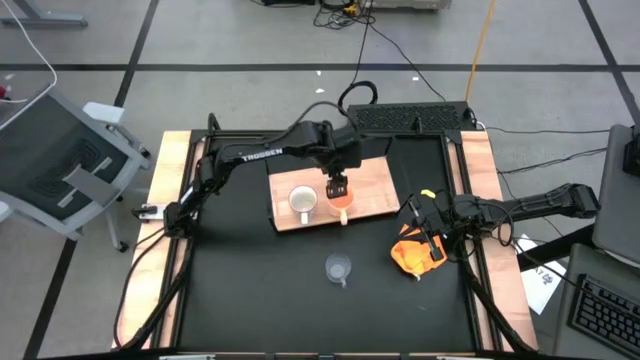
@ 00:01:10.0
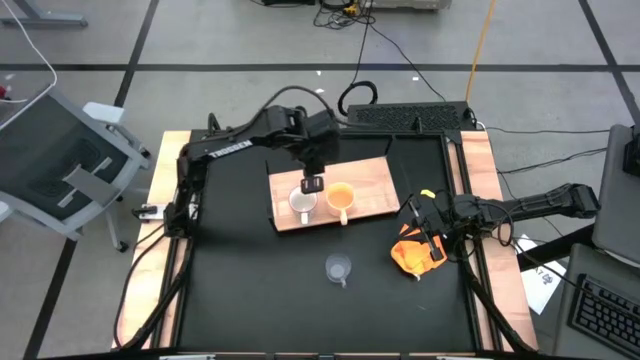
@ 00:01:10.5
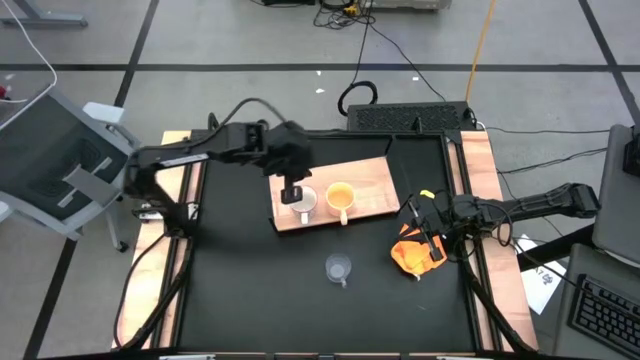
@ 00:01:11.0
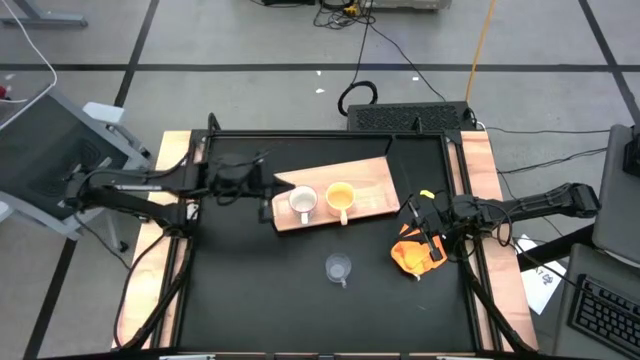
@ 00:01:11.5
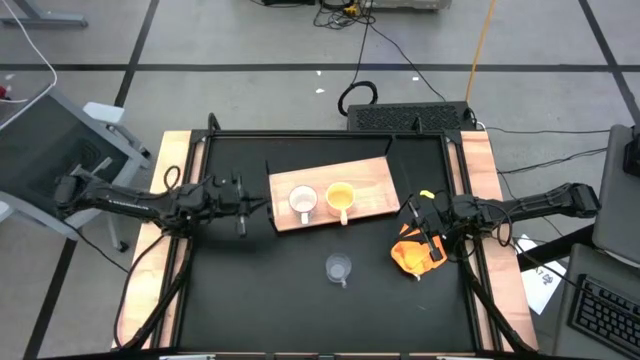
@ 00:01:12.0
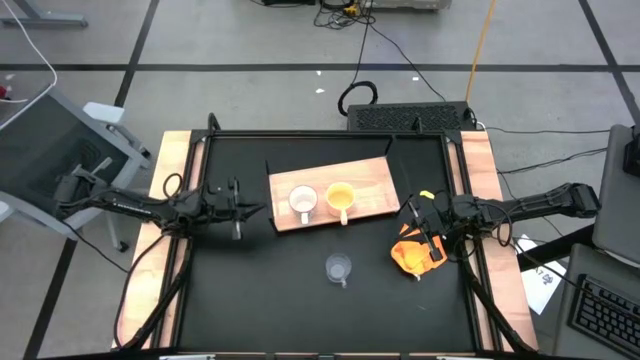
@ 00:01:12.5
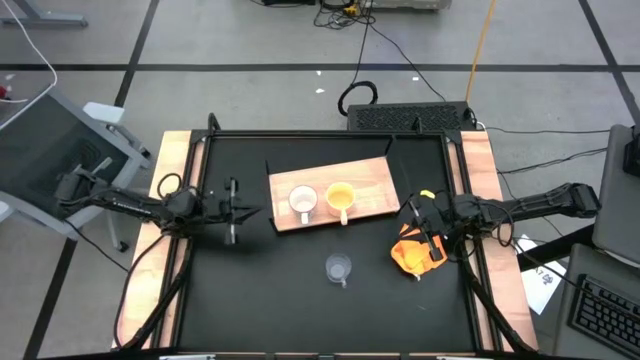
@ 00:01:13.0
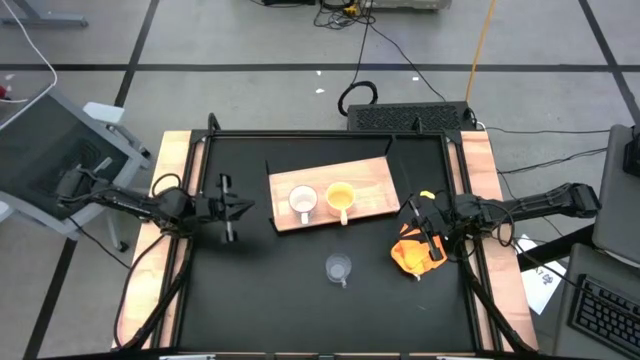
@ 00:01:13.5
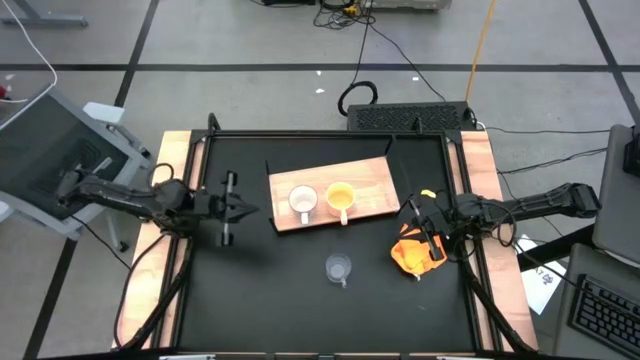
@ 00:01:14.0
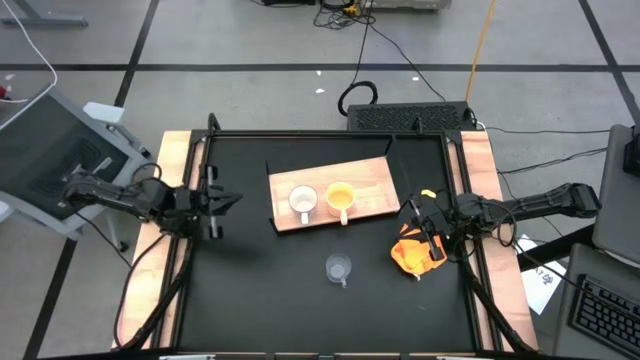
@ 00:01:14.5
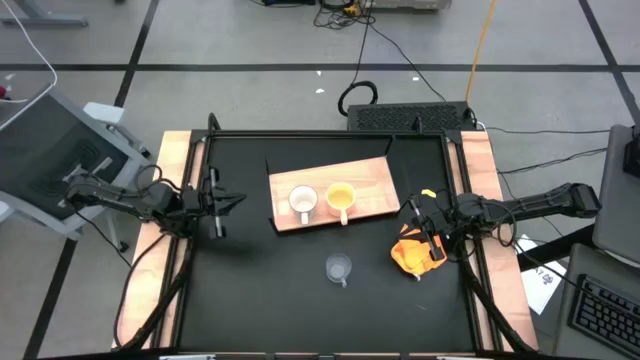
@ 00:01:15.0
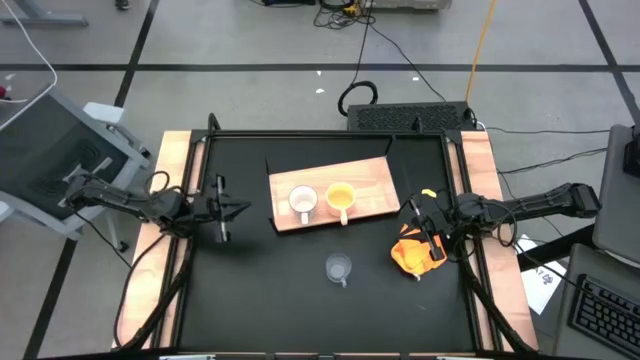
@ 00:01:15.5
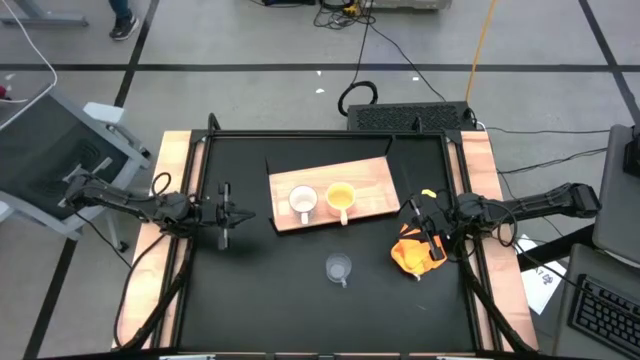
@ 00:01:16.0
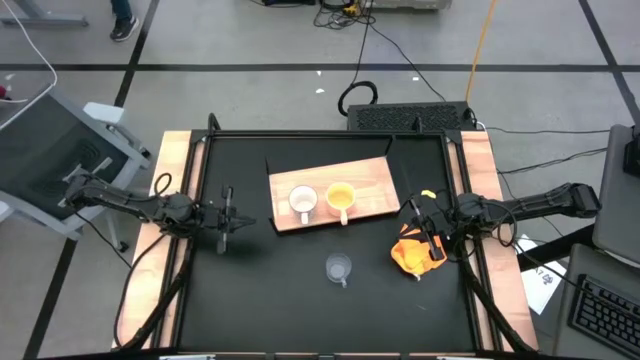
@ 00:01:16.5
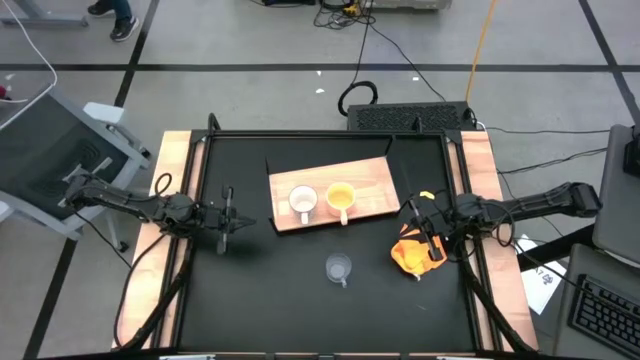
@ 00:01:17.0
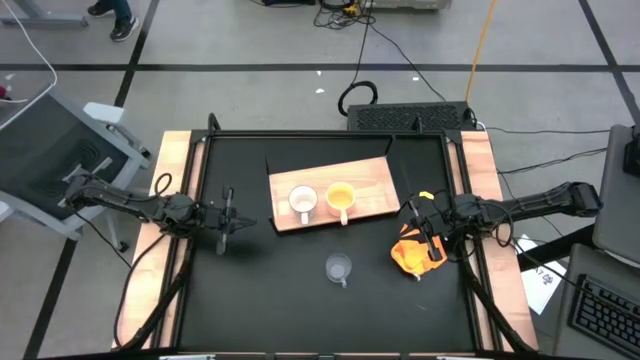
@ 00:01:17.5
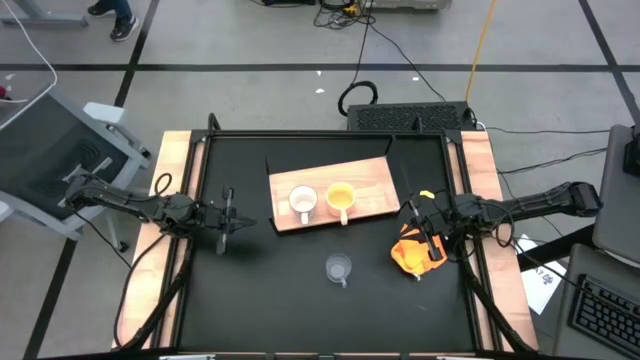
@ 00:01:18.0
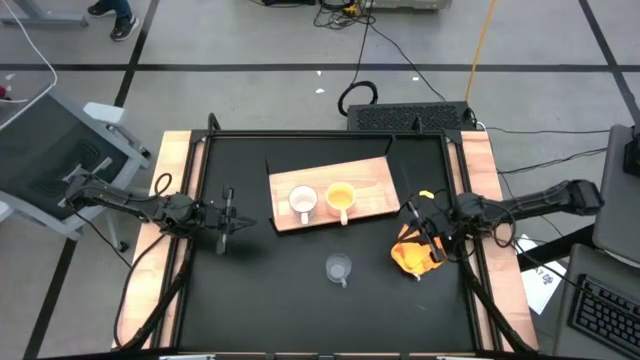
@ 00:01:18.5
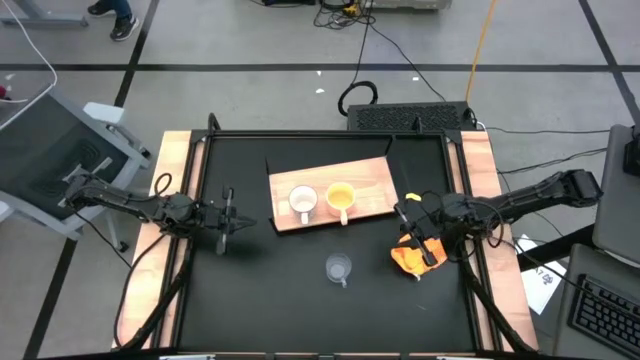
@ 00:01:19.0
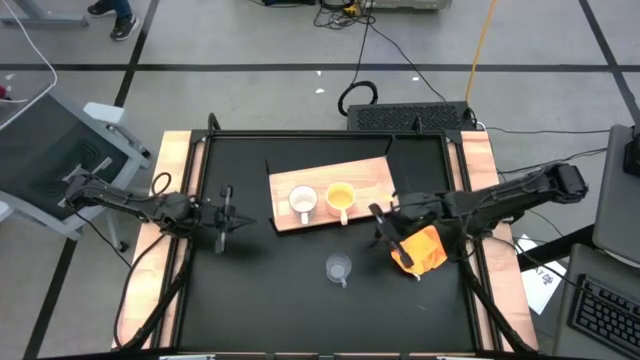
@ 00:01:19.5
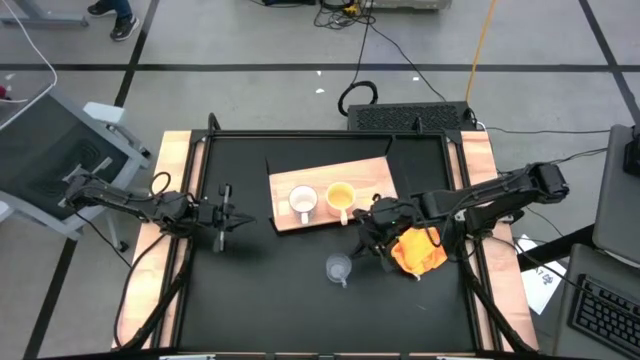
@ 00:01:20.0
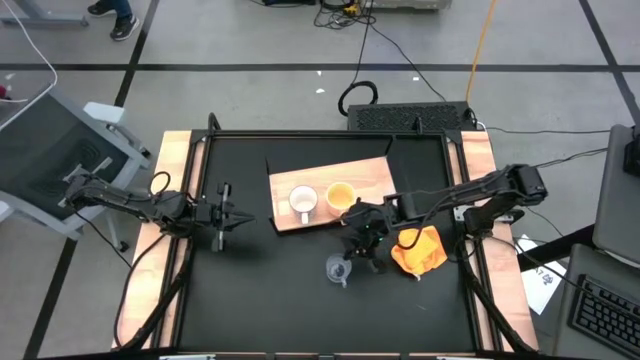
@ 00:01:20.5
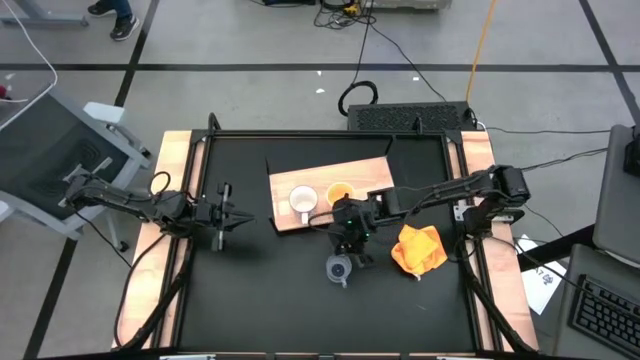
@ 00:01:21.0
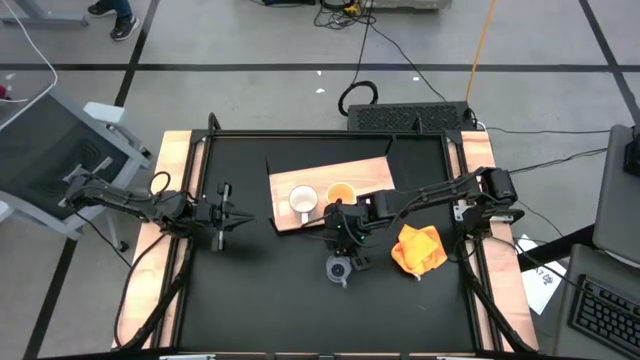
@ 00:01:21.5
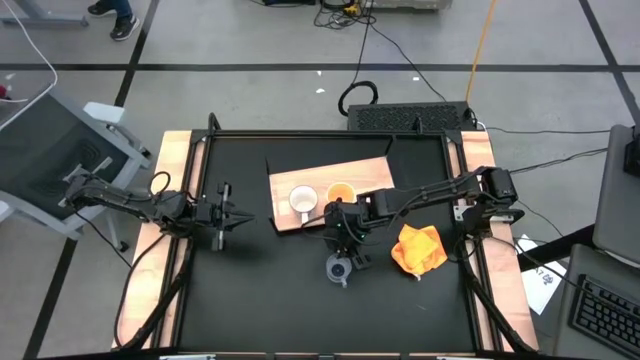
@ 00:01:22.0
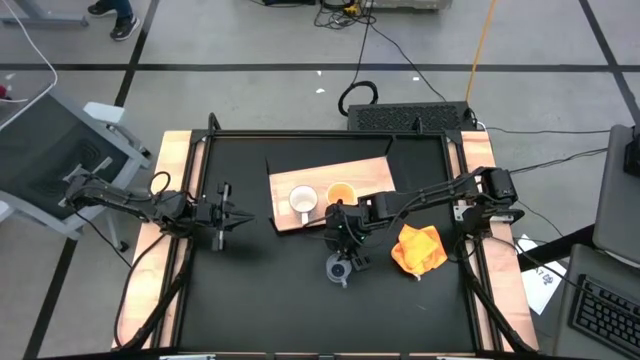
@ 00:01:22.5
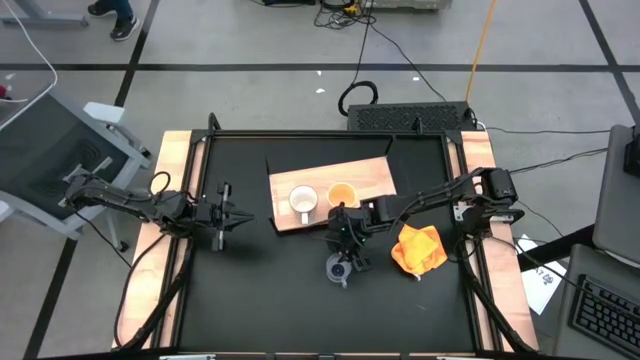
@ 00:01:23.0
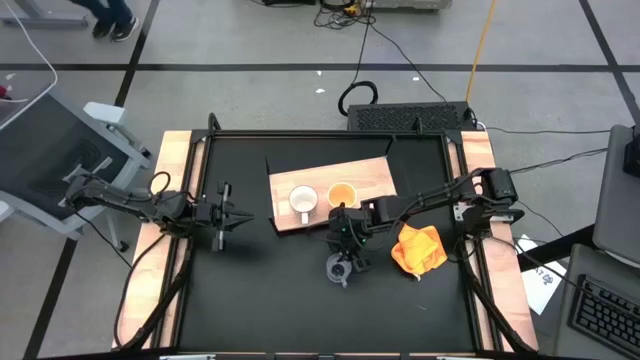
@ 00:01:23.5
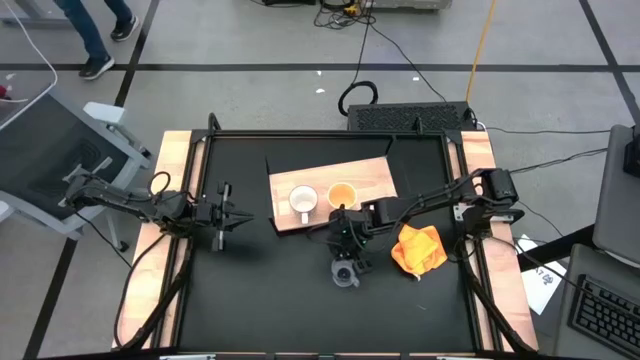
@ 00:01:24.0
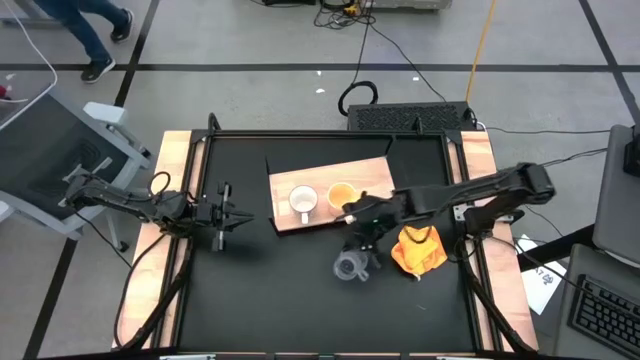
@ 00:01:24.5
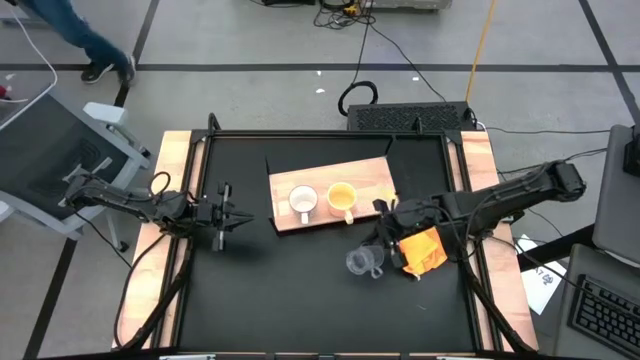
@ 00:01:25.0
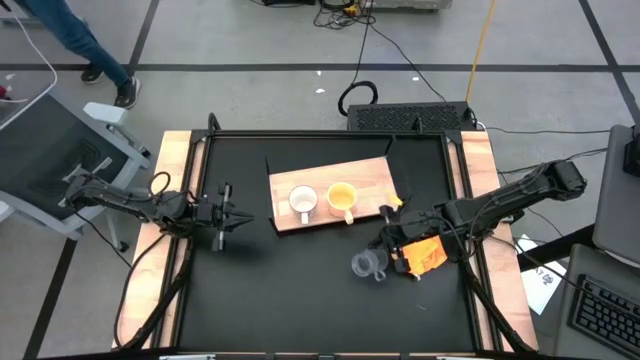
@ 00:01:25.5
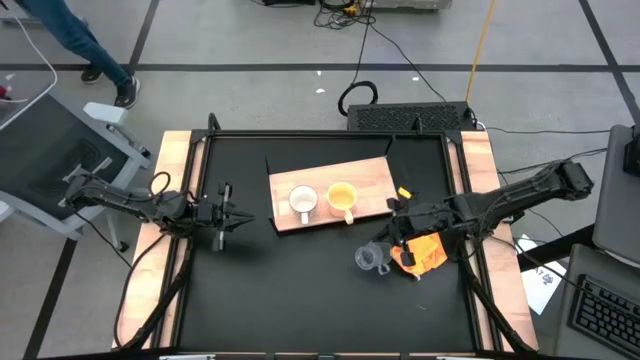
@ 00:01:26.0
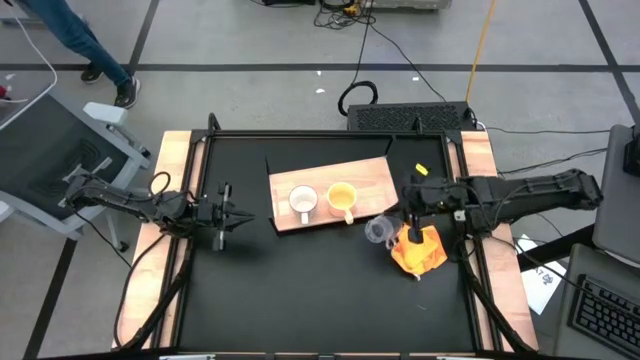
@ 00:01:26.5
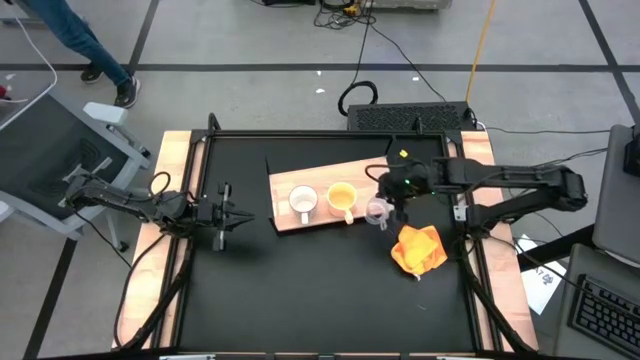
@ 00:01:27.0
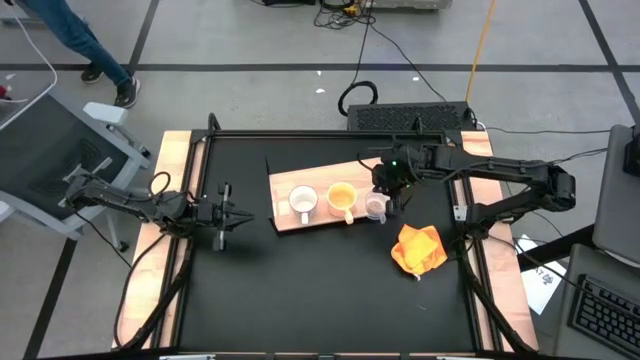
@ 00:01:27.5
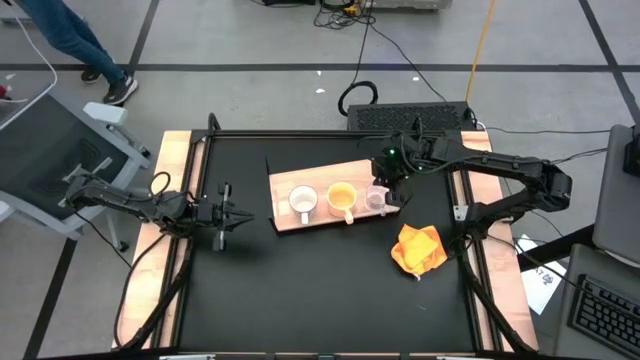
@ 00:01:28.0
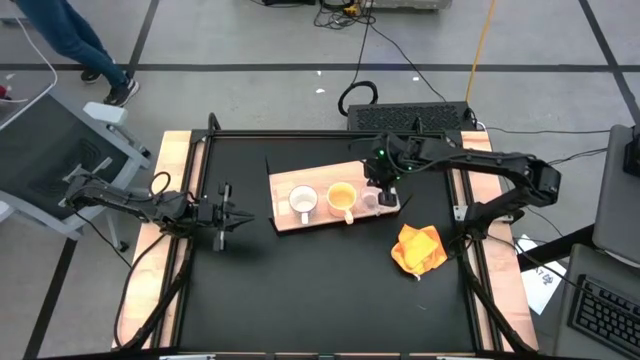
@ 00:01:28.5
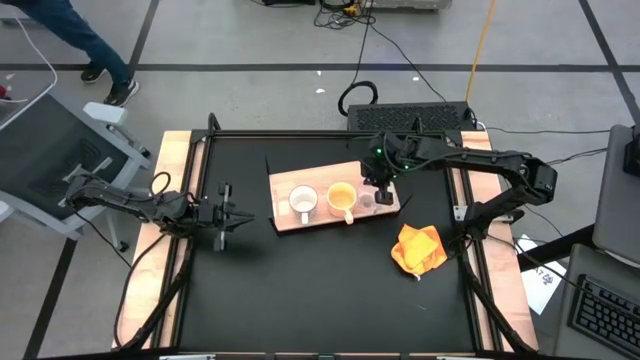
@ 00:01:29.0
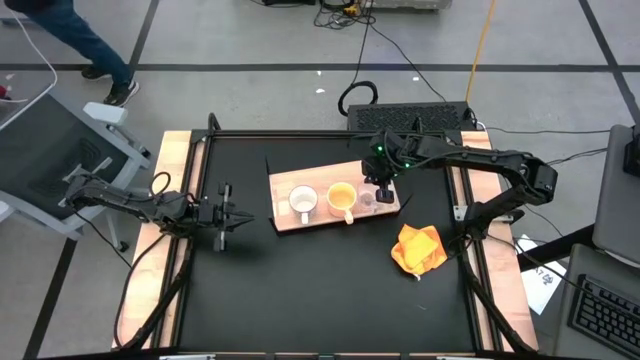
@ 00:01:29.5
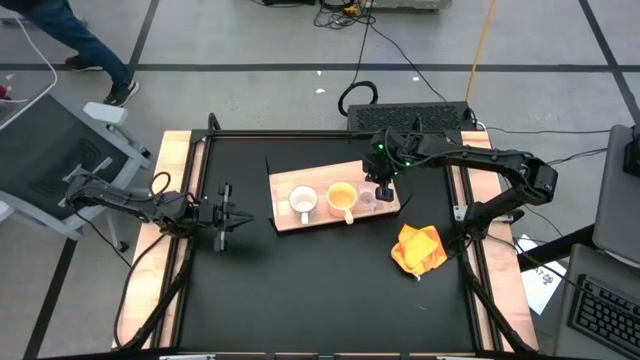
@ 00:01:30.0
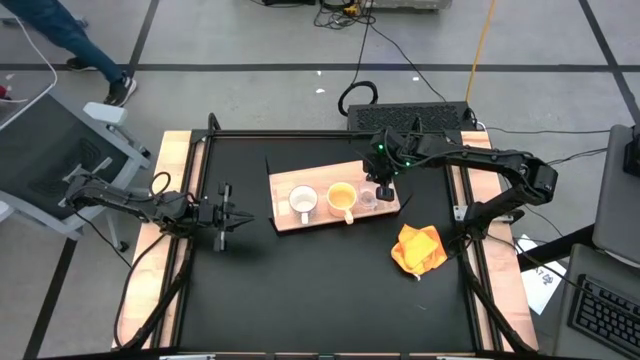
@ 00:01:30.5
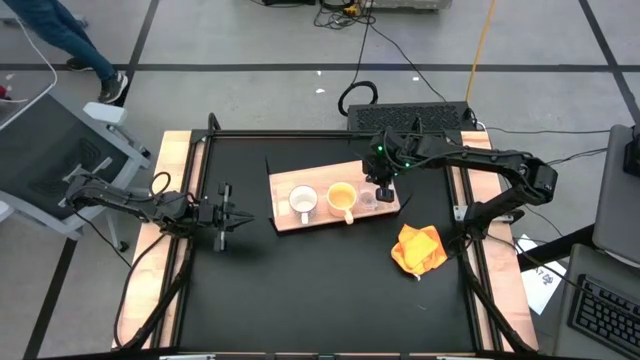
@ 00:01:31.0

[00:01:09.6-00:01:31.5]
Task: Stack small to large cups/mugs on shelf
Put the transparent mug on the shelf
